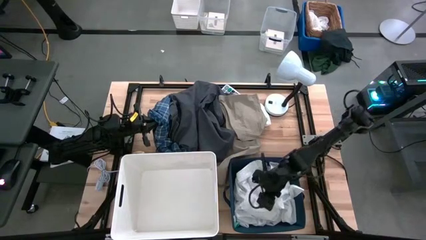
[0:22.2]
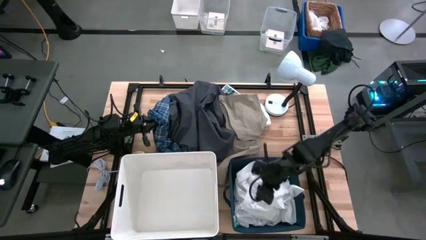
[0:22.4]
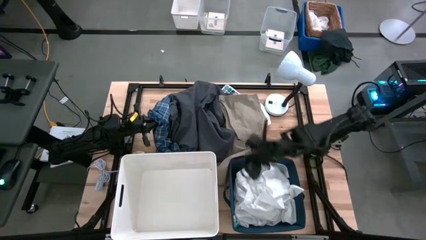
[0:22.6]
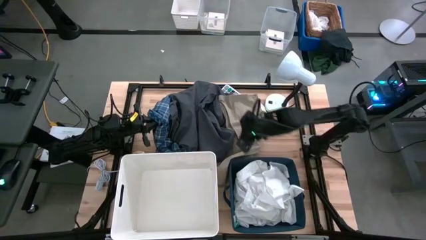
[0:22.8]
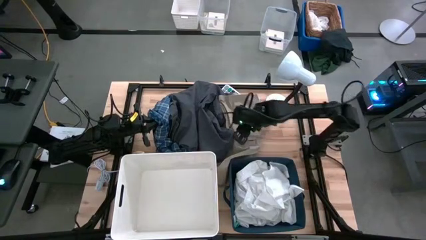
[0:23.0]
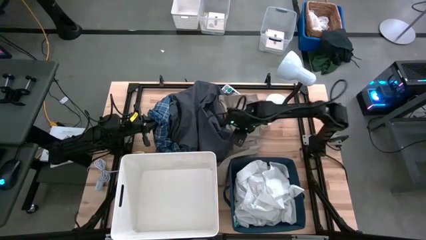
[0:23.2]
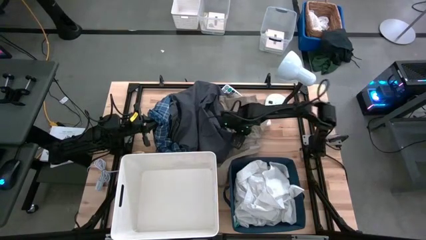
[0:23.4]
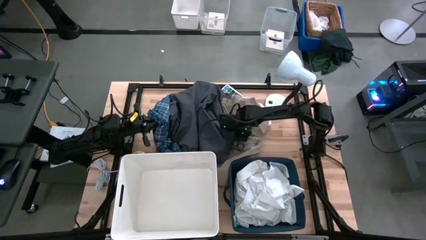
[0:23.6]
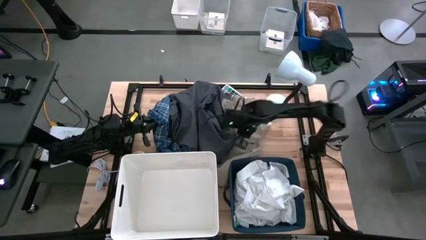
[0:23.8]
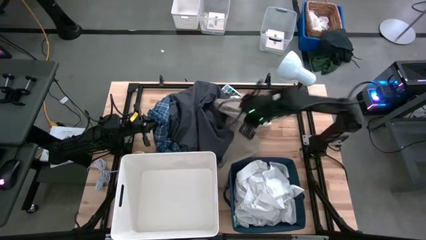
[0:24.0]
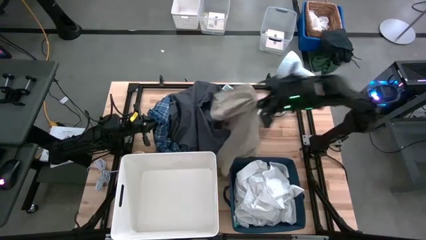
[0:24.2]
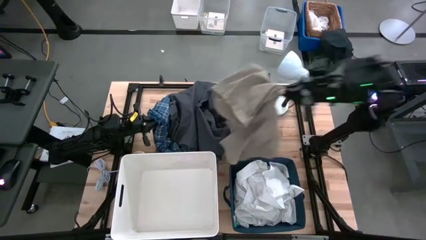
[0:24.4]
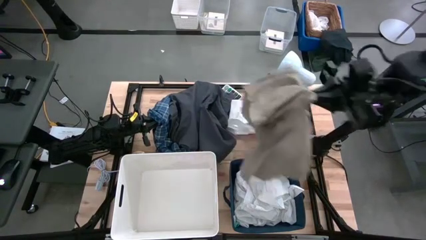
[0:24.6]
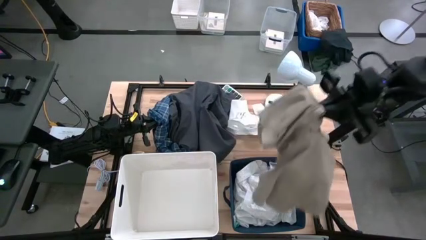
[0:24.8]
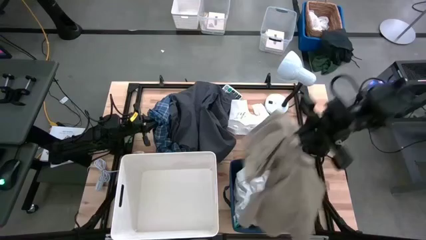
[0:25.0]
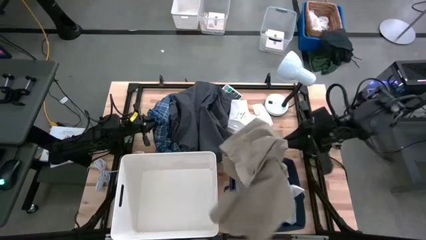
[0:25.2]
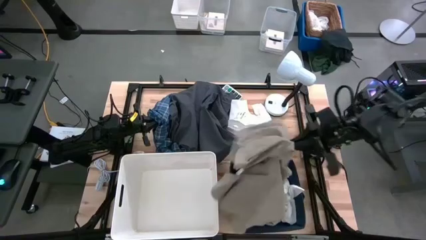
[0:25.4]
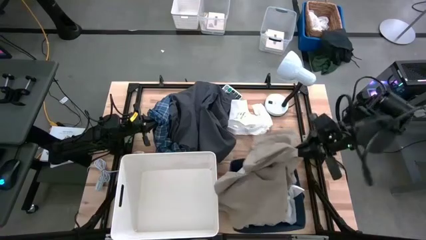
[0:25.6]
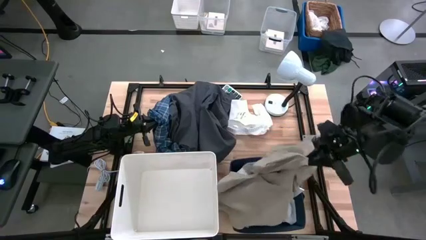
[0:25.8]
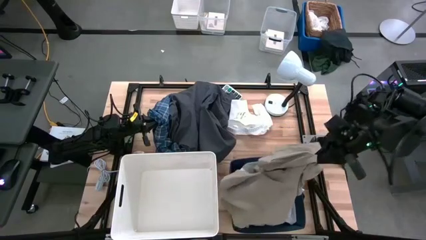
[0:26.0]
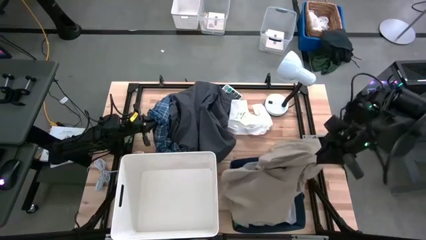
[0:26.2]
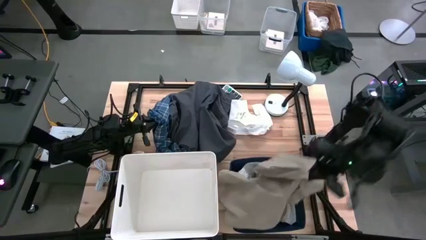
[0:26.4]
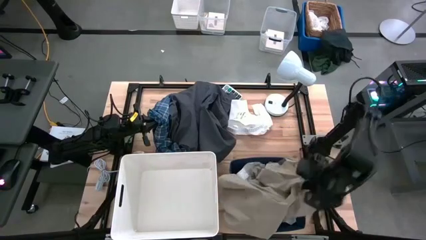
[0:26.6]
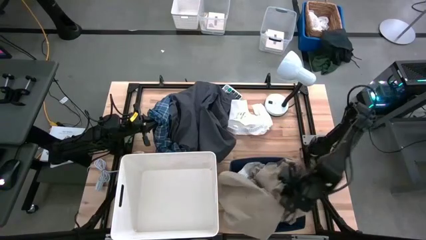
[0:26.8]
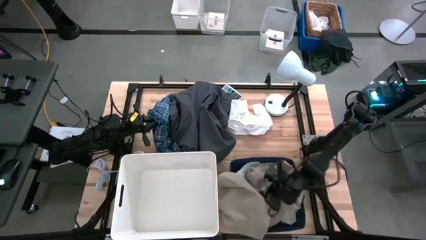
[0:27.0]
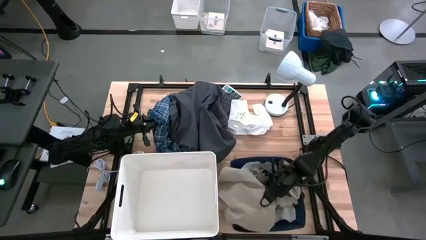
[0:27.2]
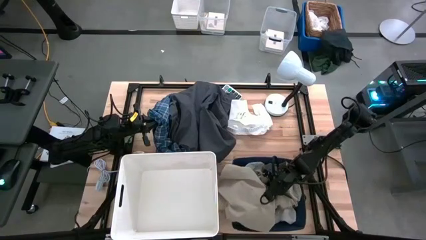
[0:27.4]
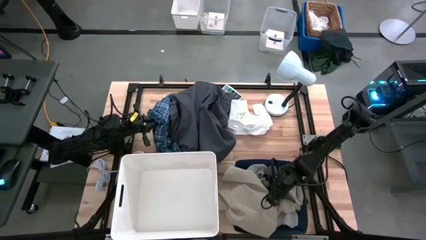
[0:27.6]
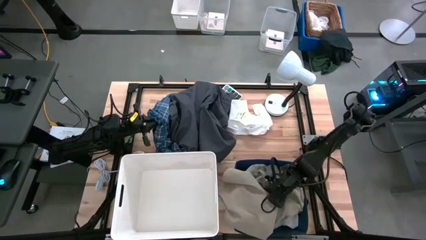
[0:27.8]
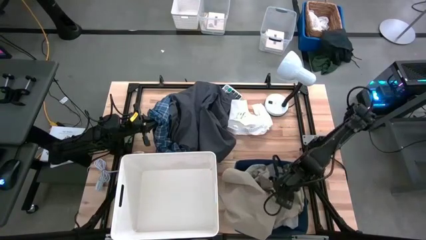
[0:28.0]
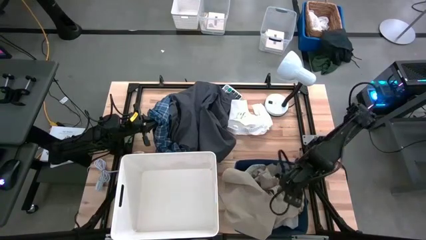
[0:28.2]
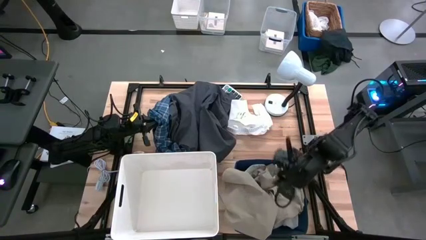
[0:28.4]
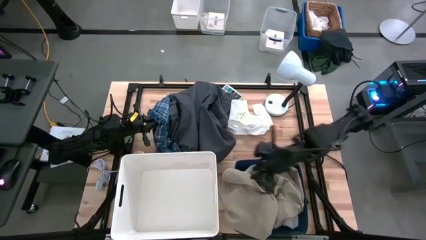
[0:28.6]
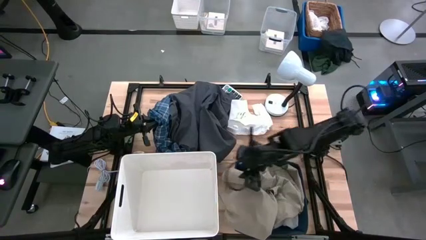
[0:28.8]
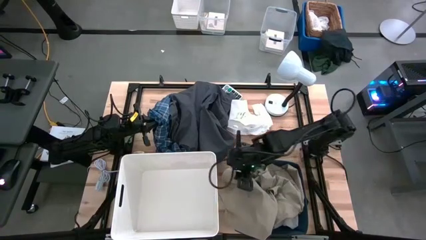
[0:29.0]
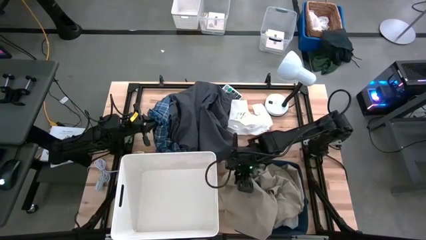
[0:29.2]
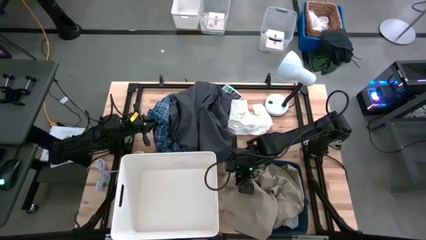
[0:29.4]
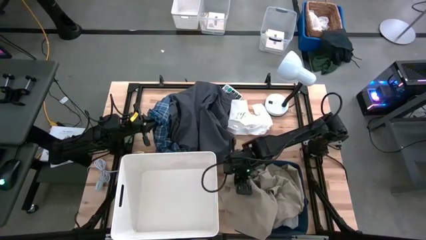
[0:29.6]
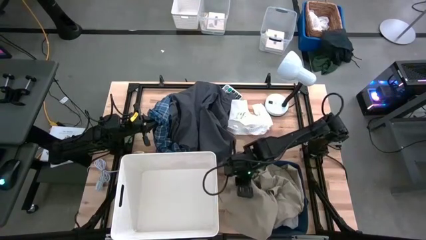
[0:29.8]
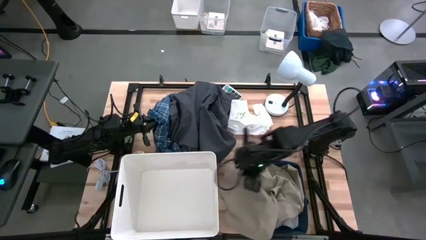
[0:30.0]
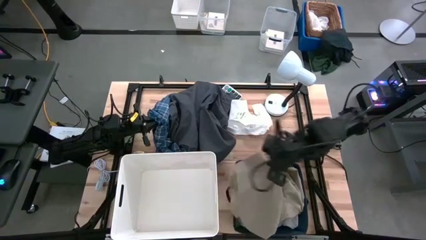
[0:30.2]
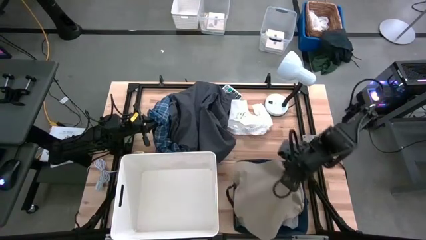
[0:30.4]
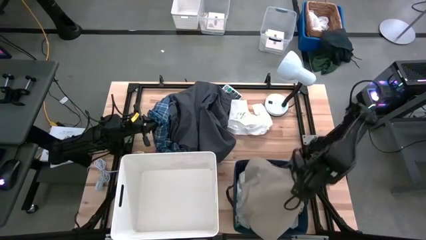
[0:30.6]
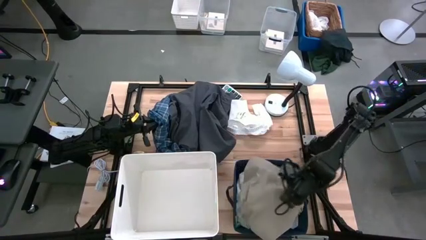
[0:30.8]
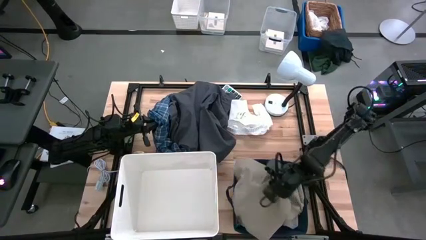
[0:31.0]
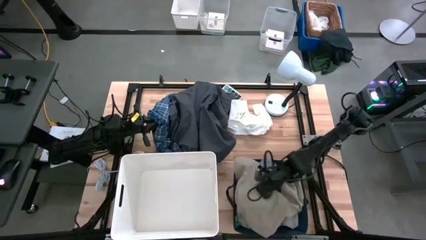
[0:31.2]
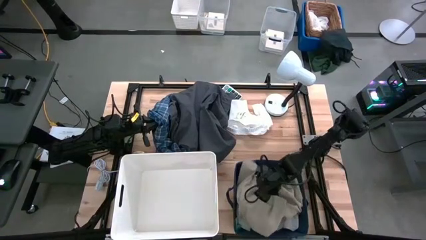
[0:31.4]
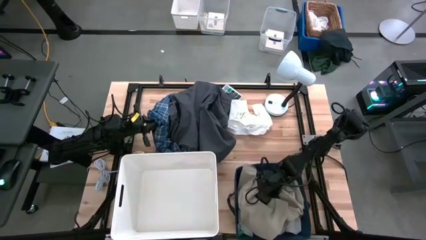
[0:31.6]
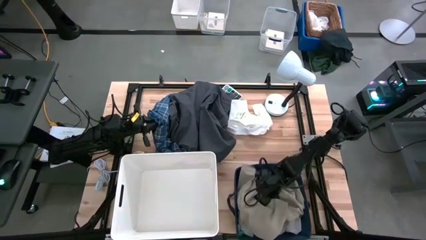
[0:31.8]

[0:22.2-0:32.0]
Task: Sort clothes
Put the brown shorts into the blue laundry organizer

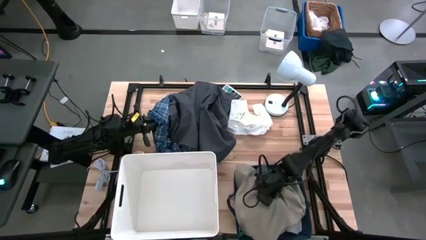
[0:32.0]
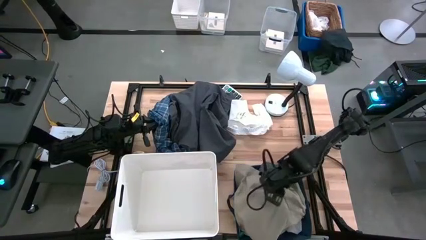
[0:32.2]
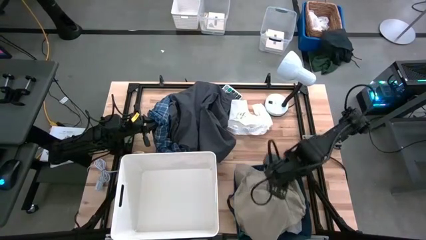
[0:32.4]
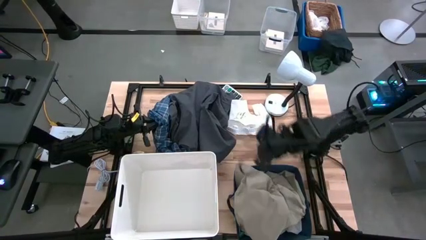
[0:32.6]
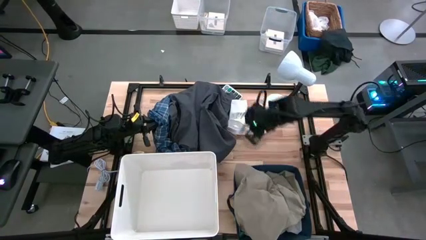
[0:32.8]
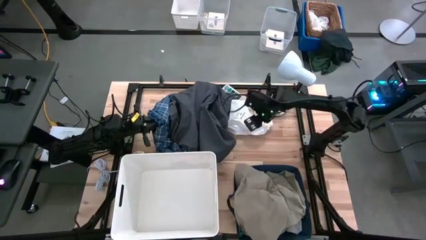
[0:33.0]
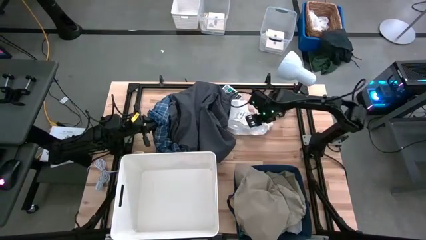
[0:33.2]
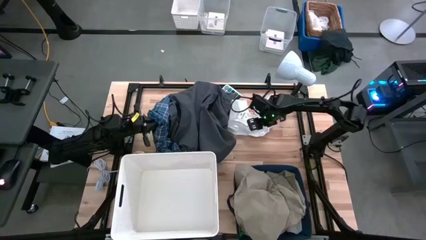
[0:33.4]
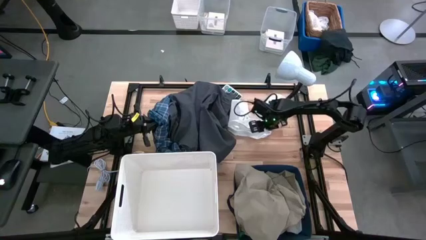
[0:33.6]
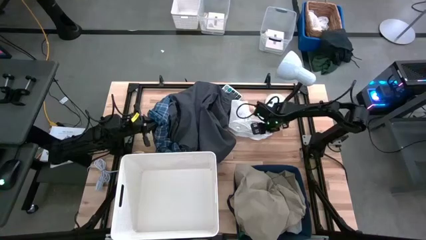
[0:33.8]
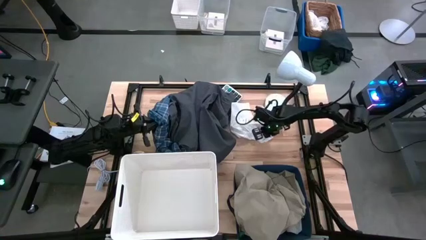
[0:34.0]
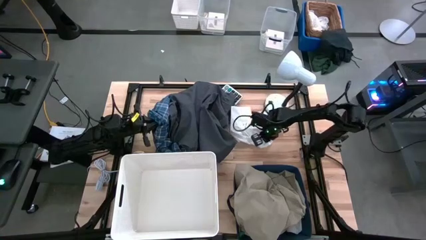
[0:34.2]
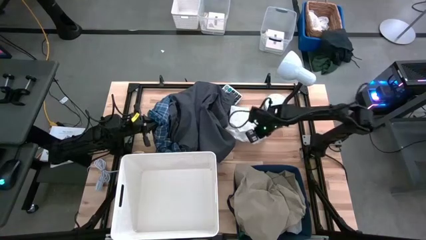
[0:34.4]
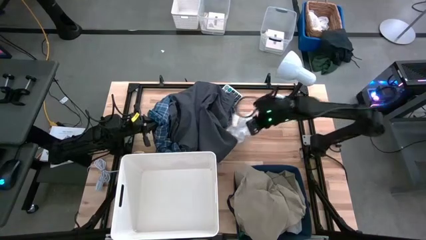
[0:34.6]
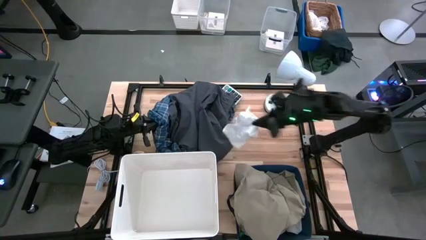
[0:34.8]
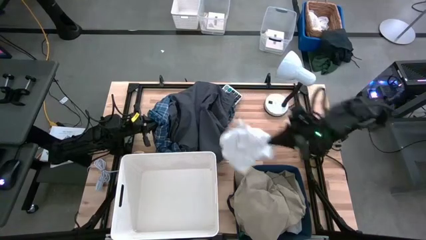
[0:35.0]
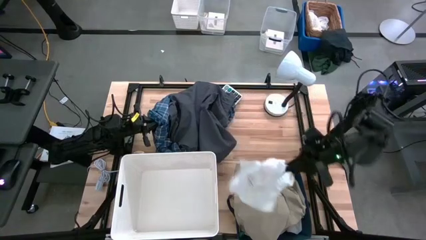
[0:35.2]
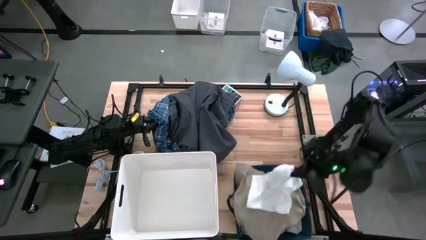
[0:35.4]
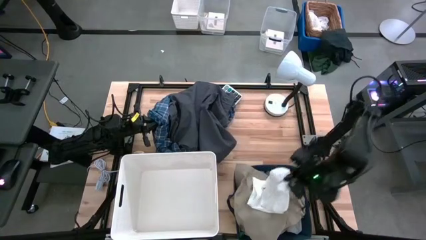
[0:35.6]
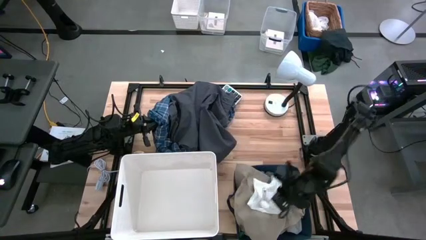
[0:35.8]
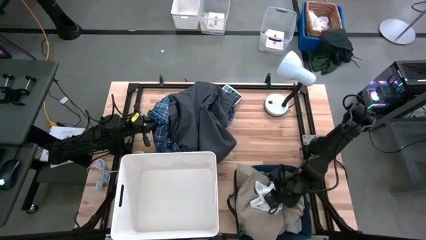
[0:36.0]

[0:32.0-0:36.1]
Put the white boxers into the blue laundry organizer

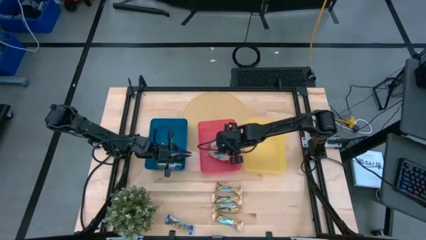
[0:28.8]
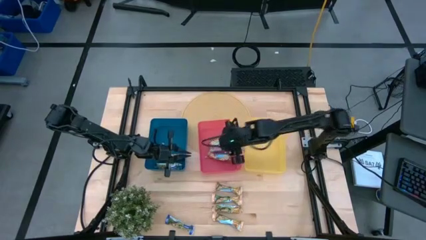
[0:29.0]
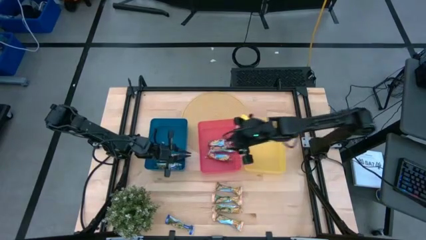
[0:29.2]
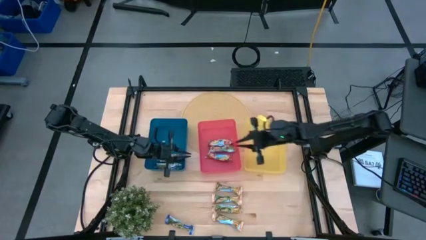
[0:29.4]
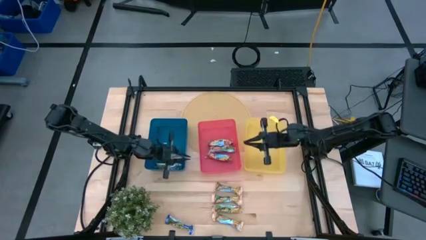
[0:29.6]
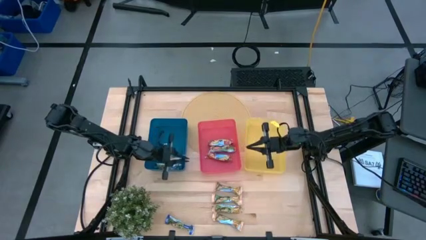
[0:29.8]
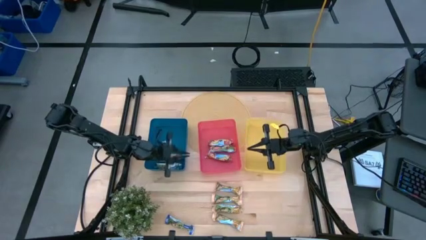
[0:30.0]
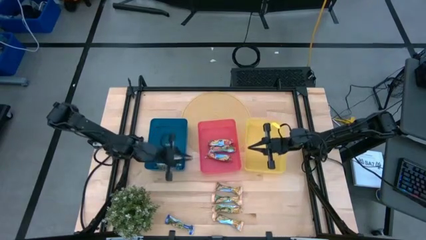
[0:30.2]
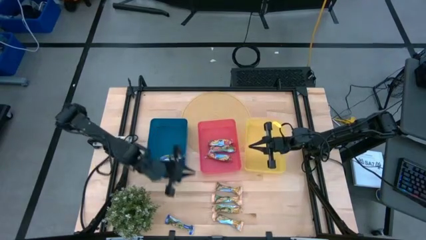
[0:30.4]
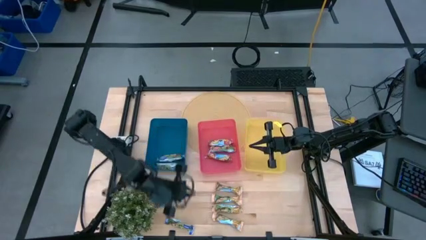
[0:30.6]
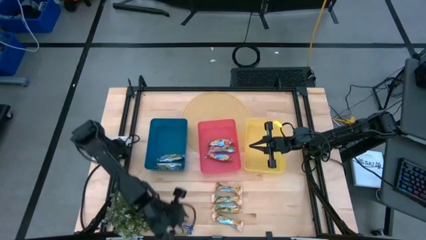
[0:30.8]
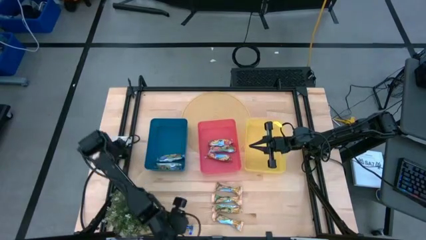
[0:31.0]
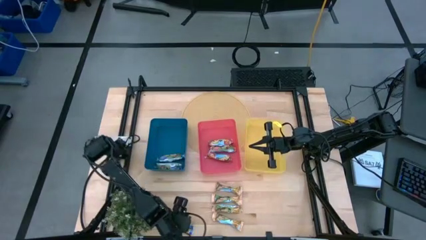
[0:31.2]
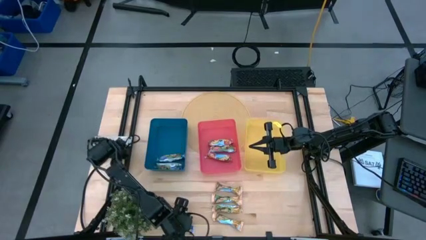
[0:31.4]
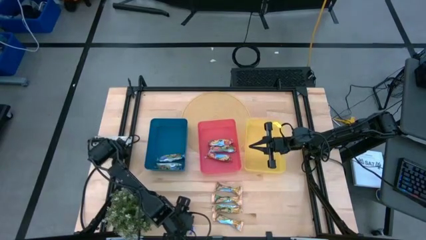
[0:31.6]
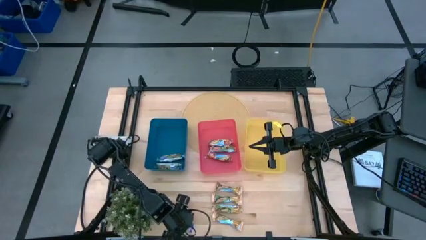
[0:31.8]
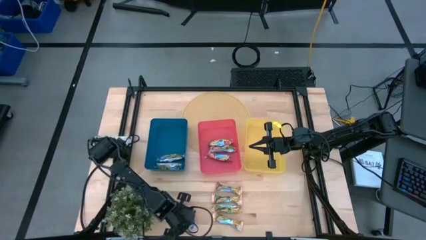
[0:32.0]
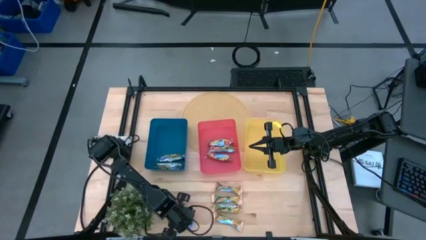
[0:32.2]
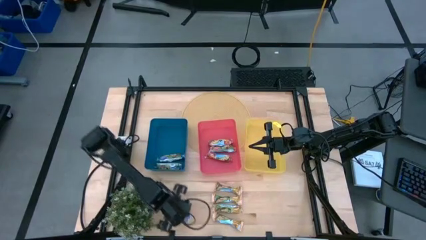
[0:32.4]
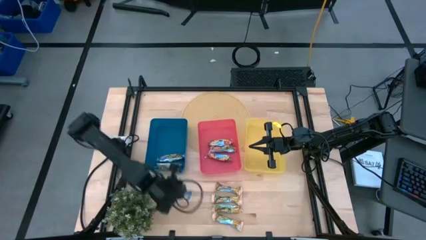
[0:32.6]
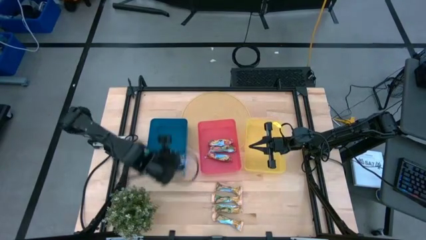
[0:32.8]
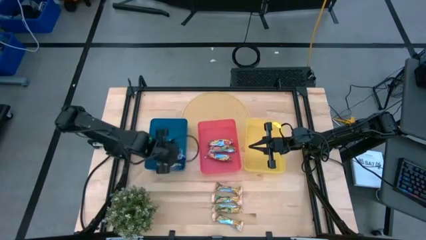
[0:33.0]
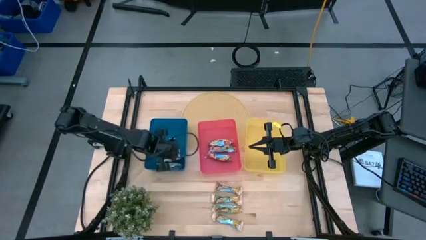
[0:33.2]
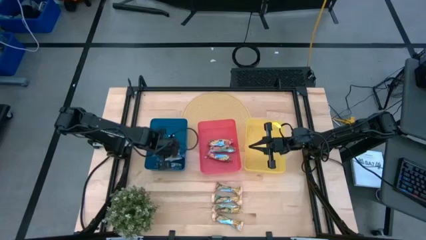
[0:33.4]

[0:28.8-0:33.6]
Task: Pick and place Granola Bars by type
Put the blue granola bar into the blue bin
